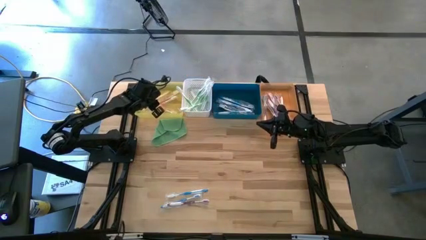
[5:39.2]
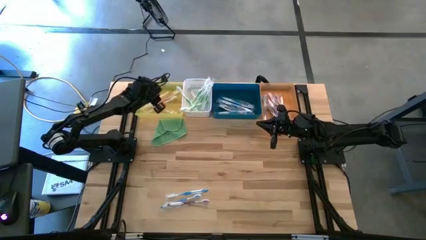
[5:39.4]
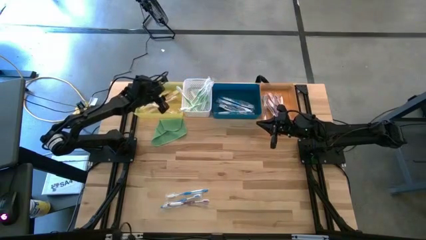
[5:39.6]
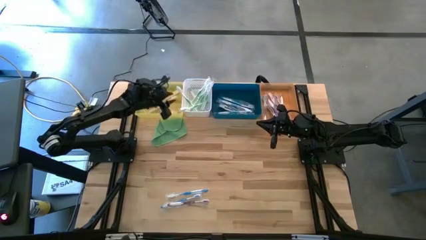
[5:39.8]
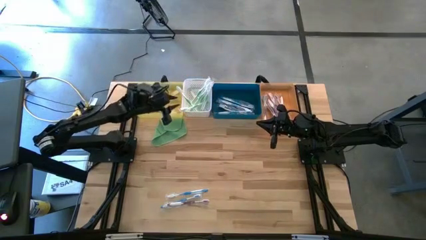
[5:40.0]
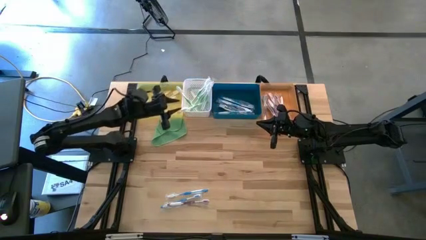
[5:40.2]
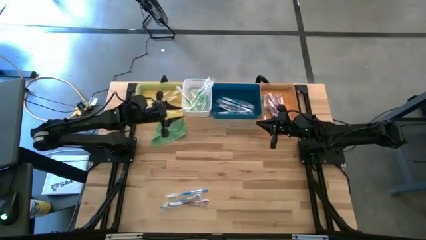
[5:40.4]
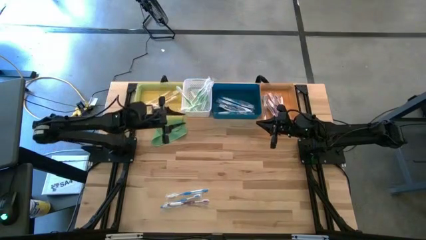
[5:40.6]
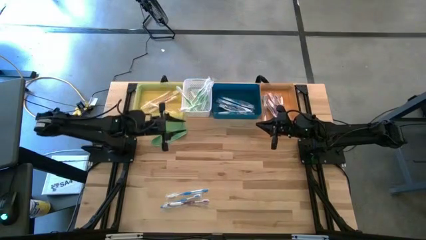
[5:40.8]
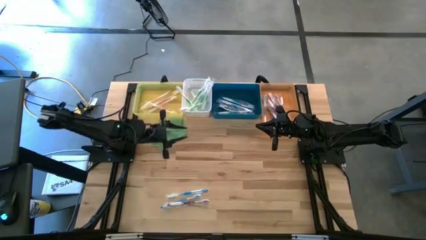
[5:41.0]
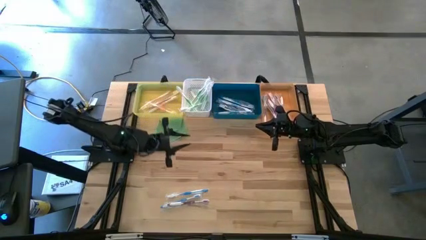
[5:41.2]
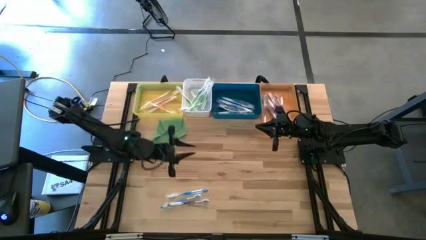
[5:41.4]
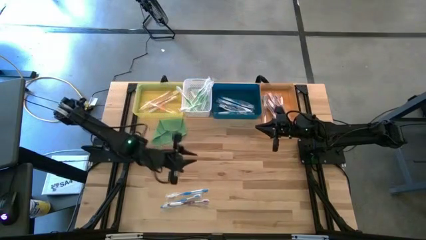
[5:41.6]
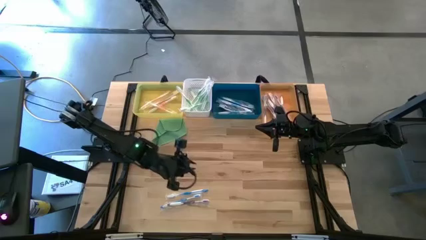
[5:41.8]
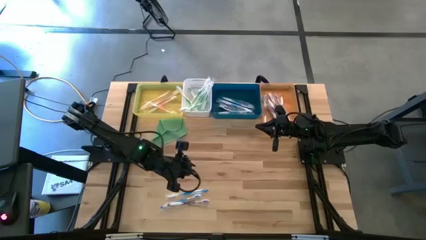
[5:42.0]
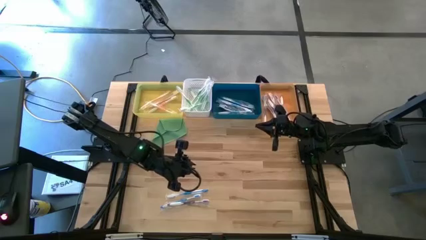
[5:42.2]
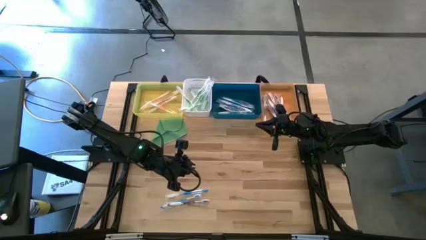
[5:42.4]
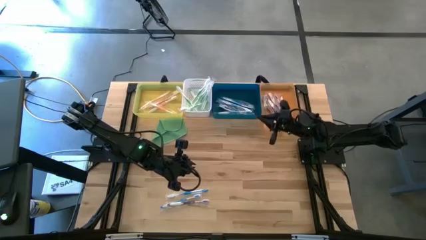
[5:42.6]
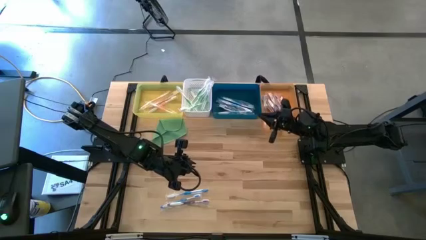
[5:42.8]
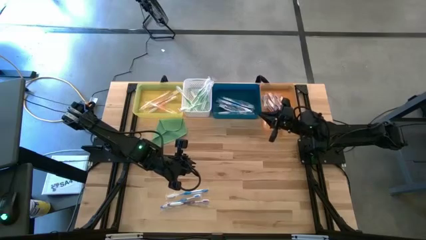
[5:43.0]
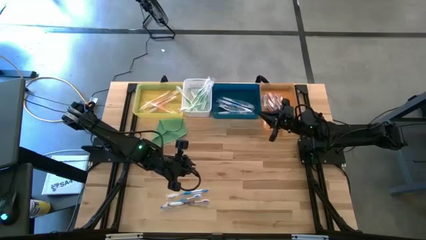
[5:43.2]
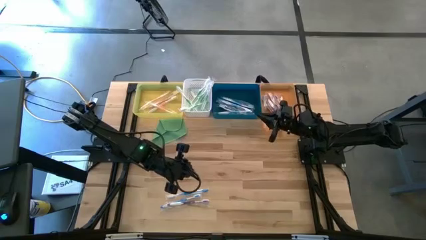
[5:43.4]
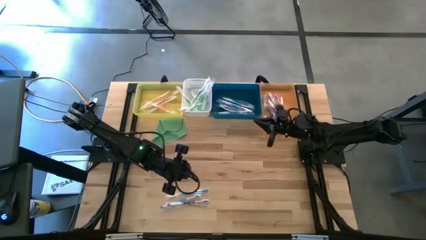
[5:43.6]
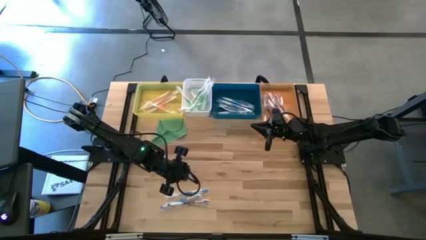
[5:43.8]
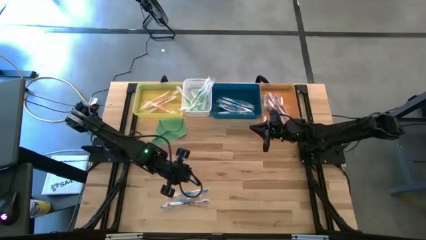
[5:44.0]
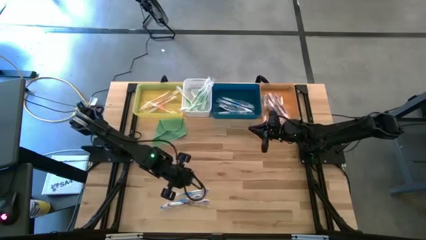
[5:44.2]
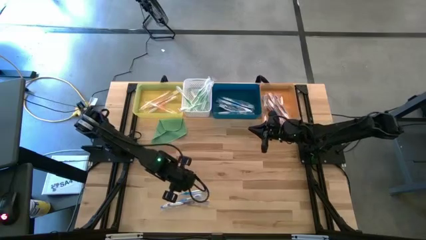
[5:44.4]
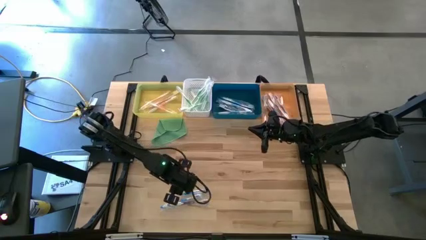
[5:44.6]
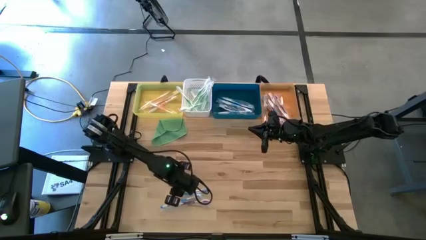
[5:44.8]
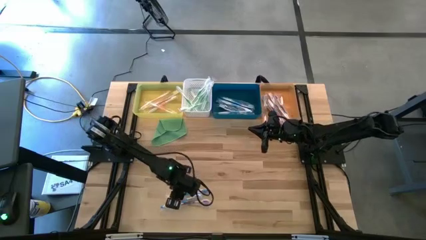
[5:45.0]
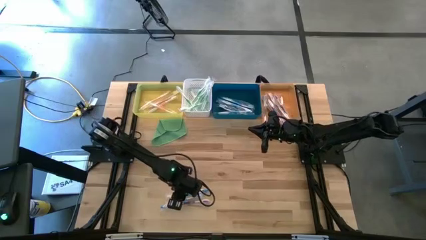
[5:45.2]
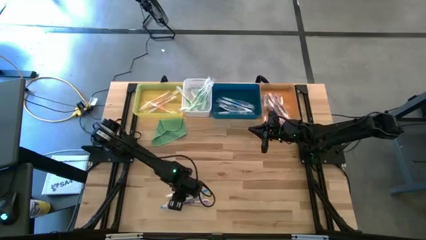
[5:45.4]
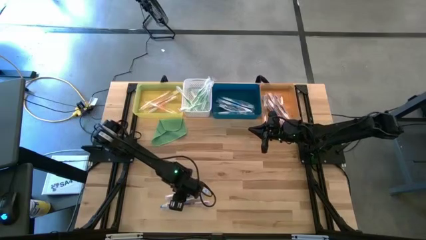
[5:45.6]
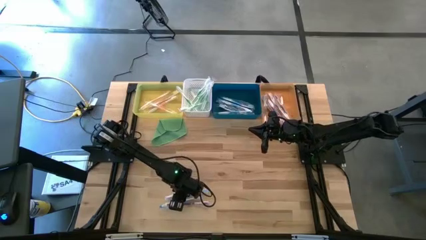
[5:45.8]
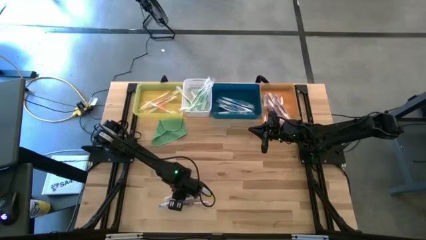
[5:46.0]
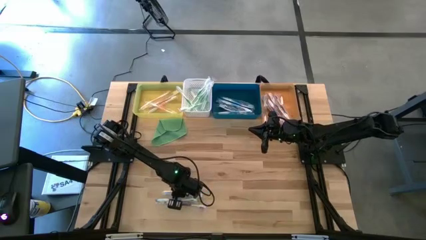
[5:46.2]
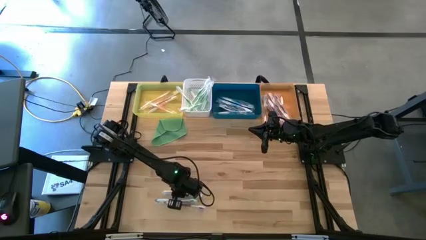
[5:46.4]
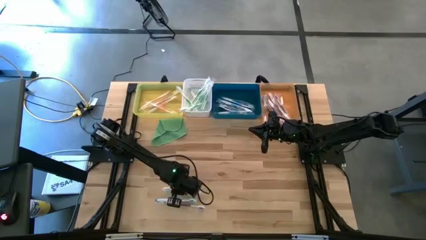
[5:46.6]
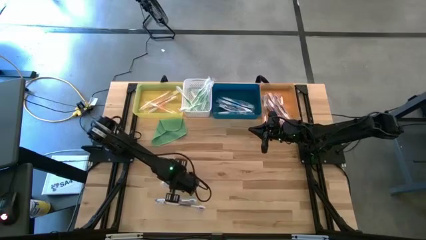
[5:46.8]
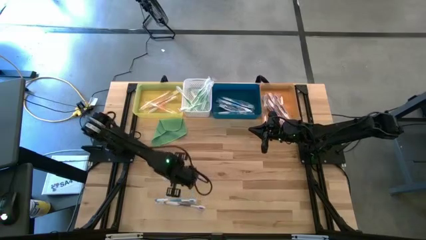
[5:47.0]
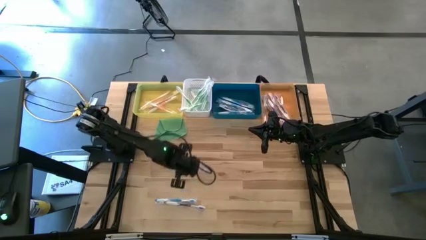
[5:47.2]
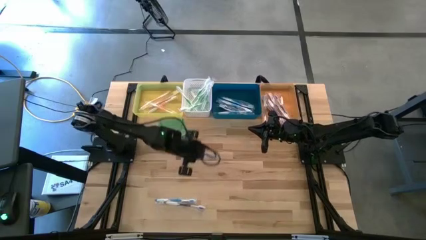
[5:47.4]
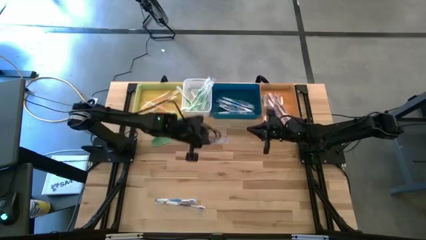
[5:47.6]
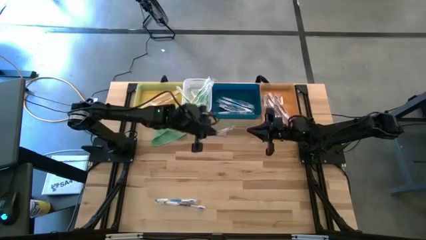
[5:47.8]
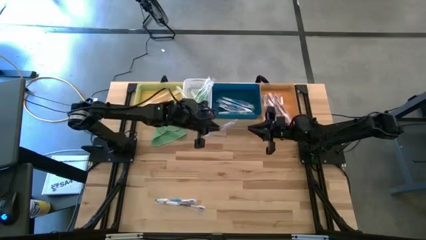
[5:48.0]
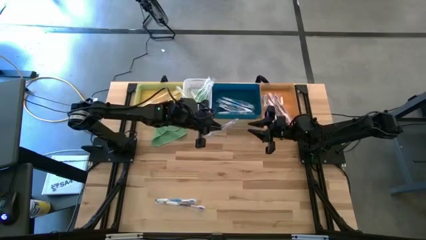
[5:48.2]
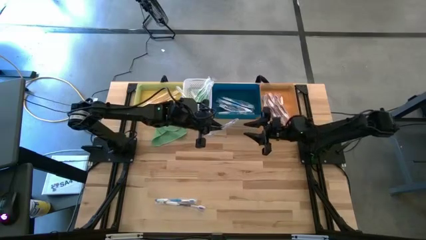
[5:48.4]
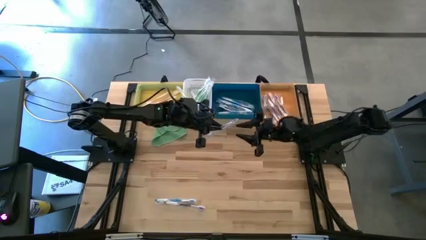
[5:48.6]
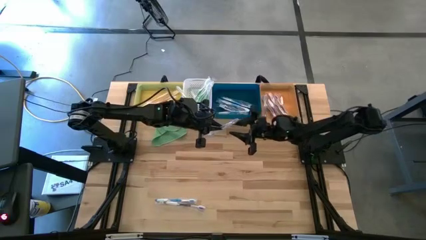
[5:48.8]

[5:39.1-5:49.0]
Task: Pick & Place Toothbrushes
Put the blue toothbrush into the blue bin

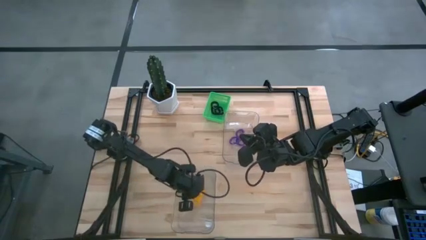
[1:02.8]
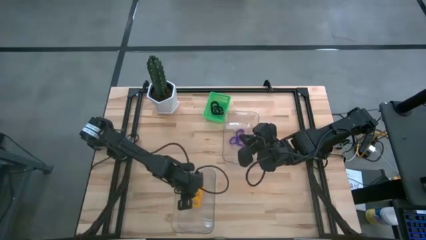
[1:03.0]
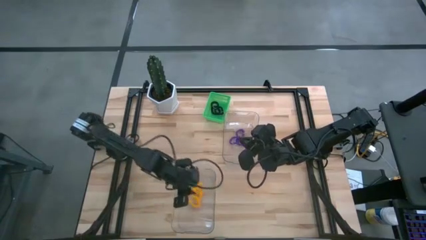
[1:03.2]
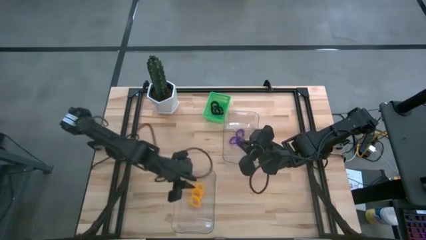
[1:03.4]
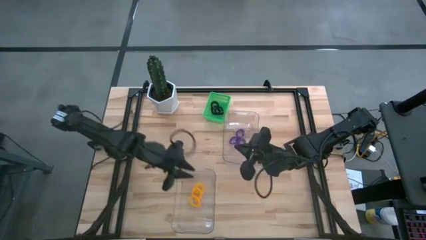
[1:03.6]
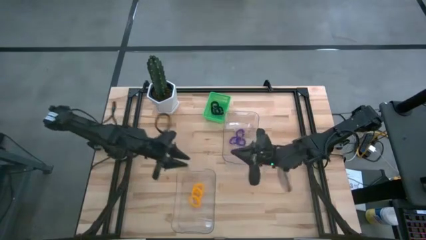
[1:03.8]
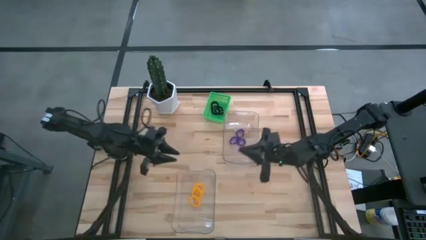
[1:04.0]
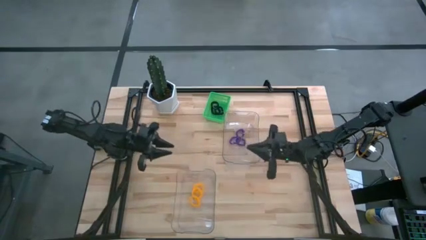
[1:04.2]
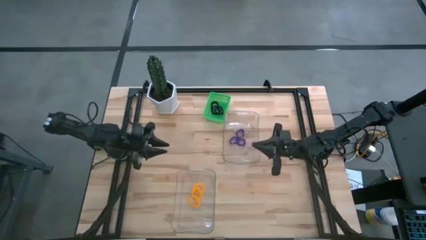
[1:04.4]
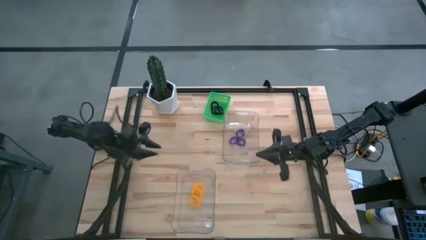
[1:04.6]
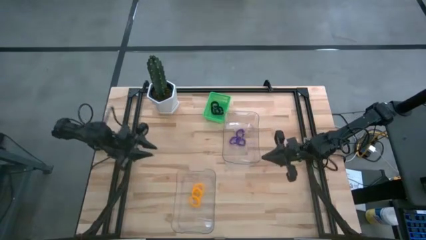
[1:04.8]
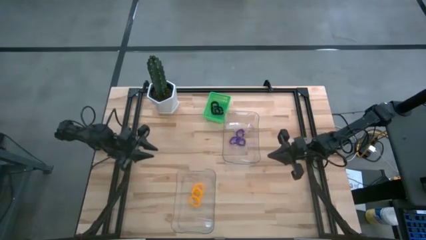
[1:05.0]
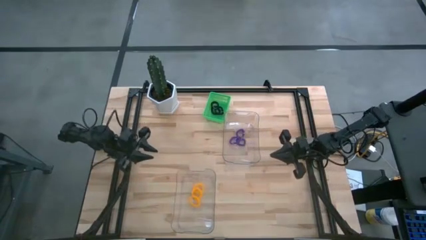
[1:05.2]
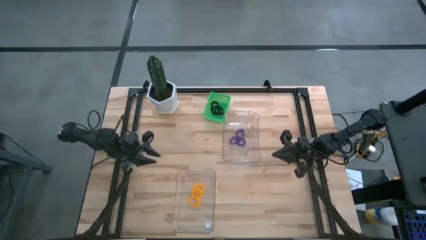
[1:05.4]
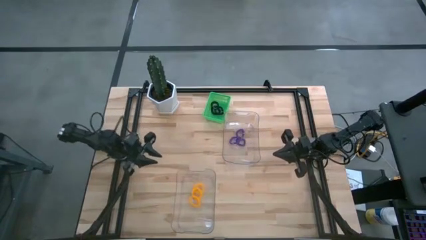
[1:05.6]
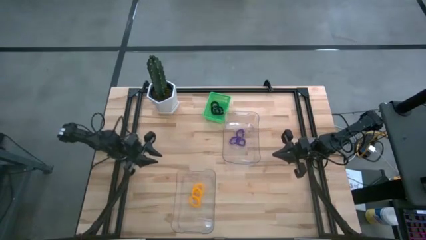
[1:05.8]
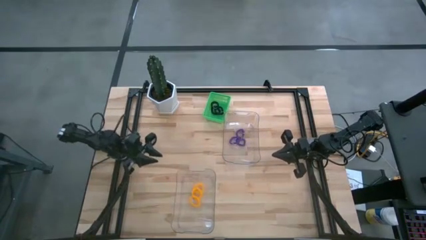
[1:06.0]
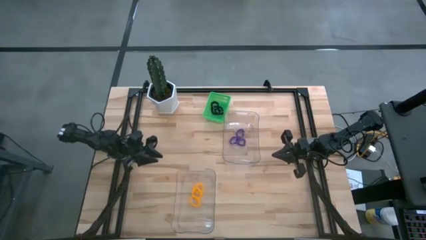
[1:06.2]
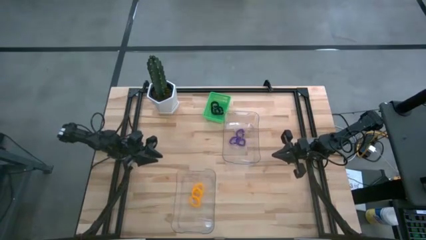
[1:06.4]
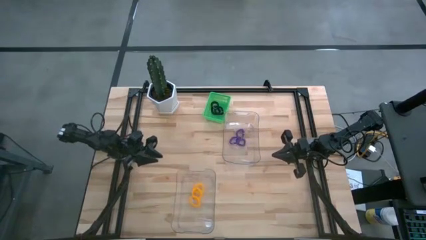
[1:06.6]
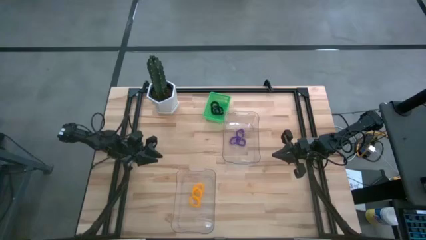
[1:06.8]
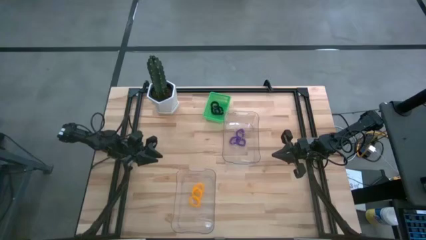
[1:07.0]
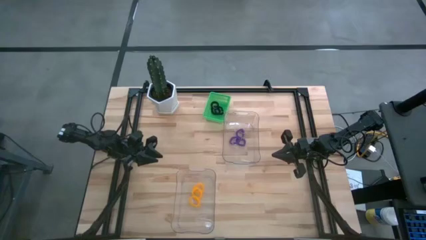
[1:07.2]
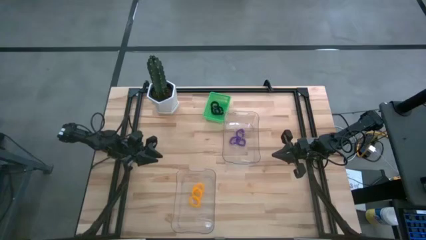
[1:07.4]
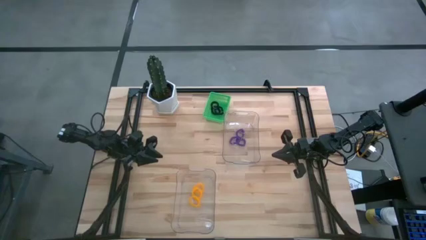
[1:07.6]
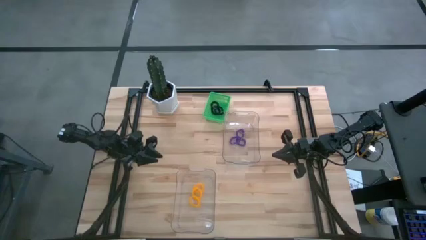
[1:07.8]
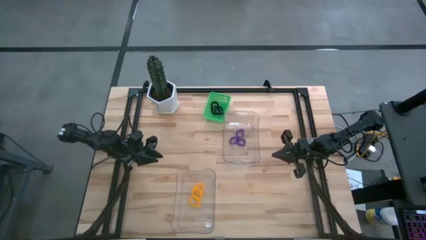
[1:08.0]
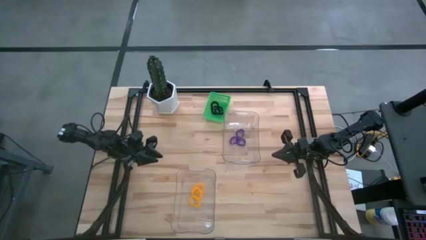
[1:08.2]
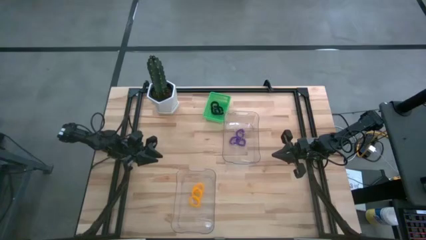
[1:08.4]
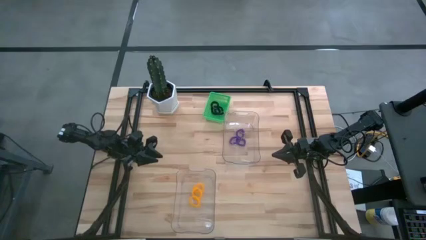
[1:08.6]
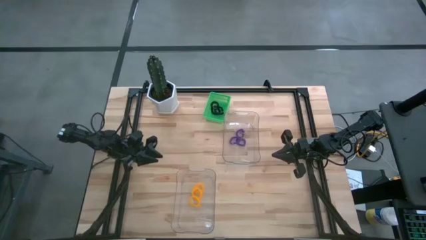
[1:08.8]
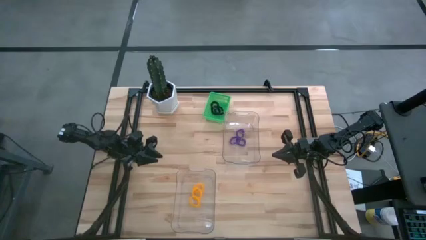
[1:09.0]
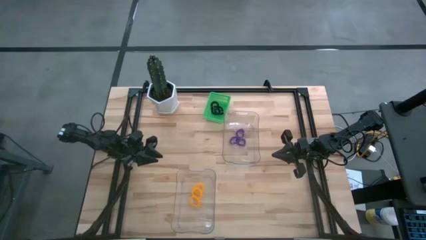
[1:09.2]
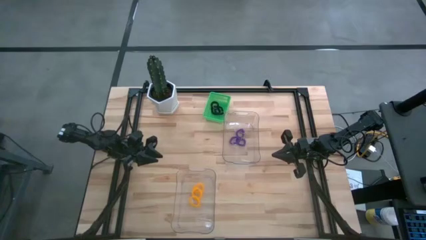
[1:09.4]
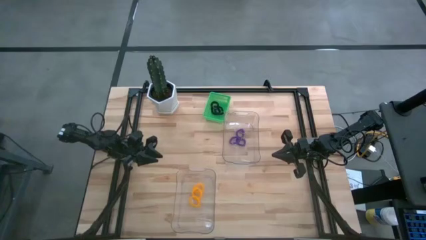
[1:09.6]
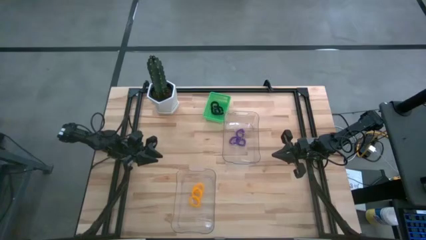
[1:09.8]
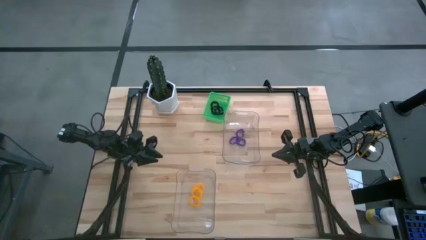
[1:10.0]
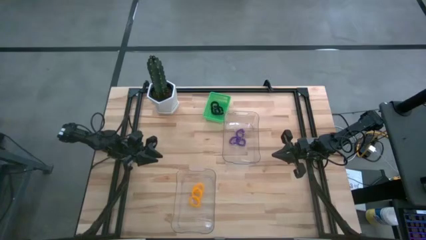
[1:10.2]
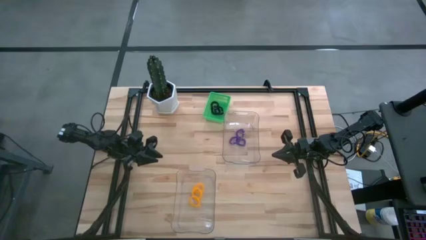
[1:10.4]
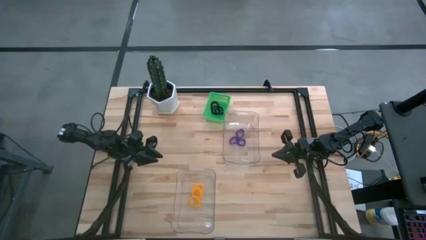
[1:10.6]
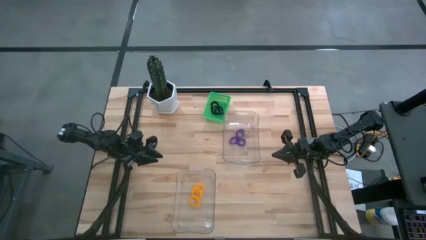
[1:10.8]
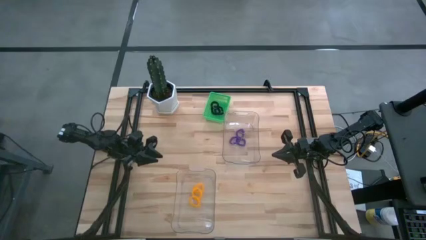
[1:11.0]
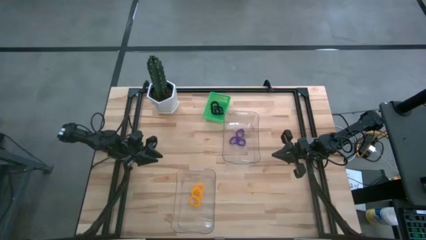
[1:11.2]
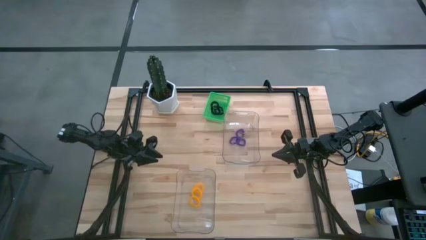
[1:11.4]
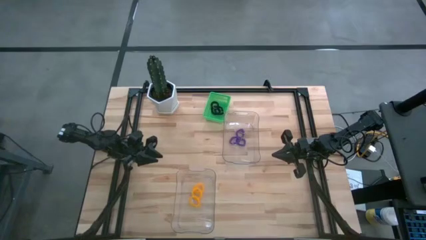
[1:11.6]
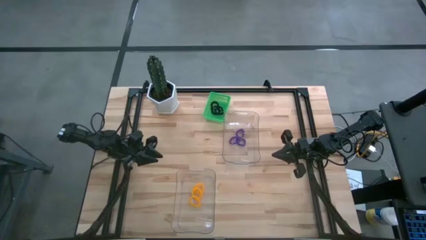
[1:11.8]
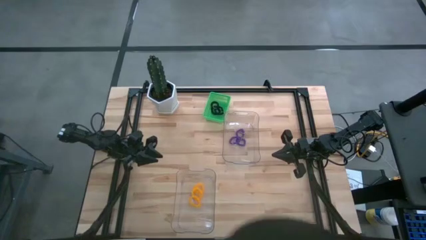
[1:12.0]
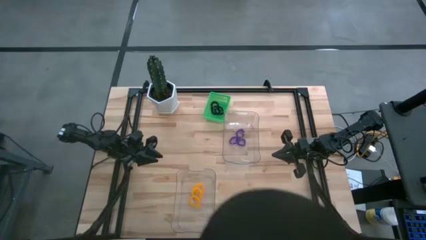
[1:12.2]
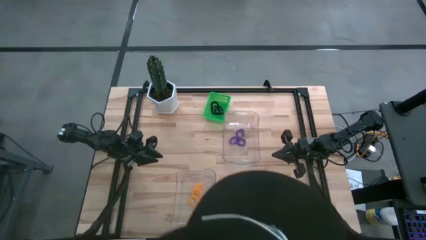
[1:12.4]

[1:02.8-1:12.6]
Task: Sort spring keychains
Return to Home Position
